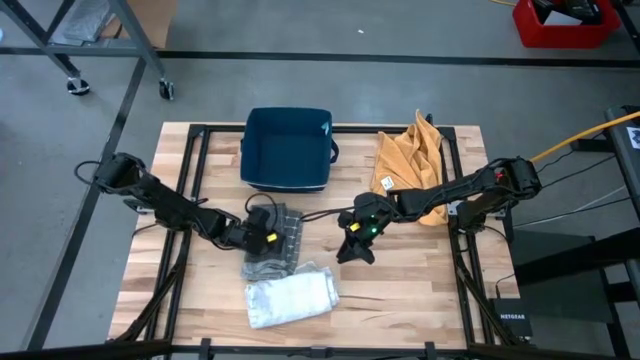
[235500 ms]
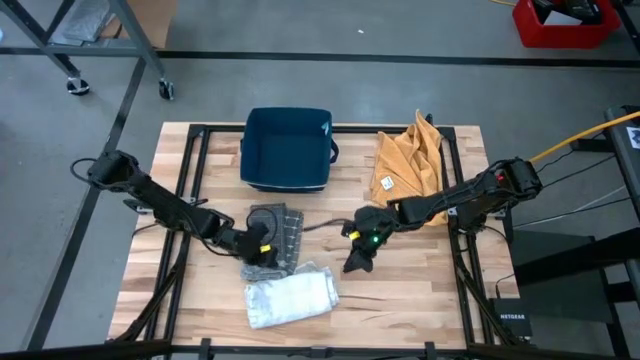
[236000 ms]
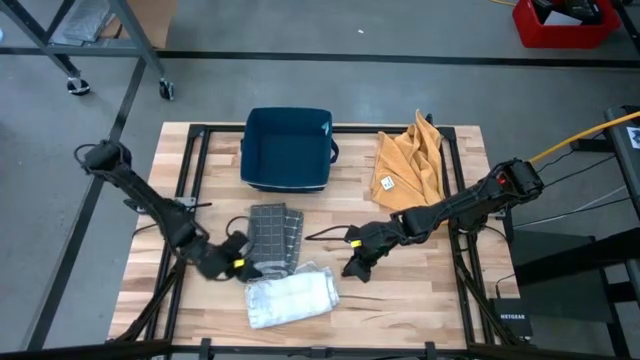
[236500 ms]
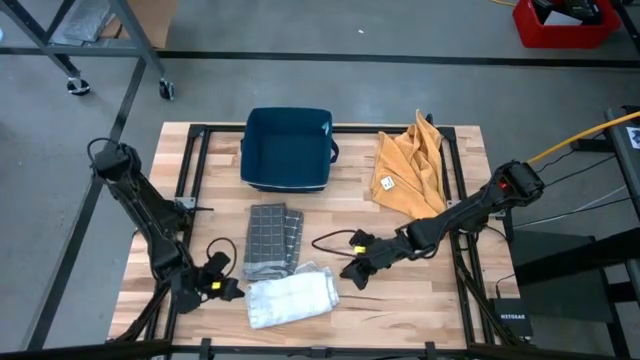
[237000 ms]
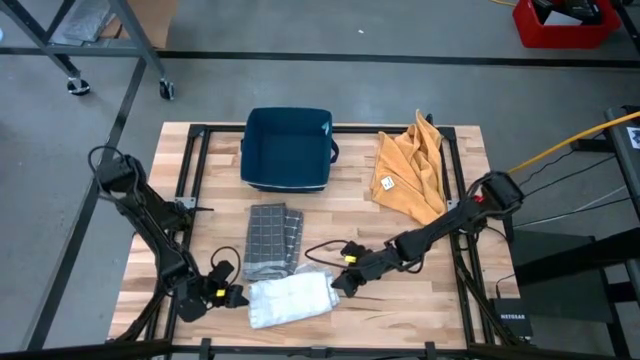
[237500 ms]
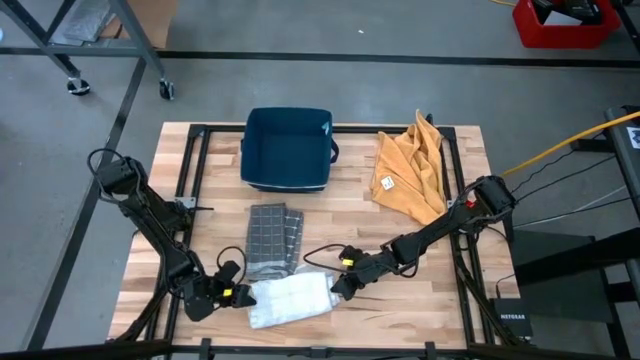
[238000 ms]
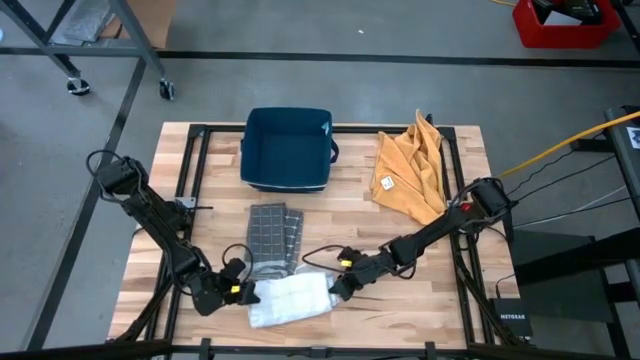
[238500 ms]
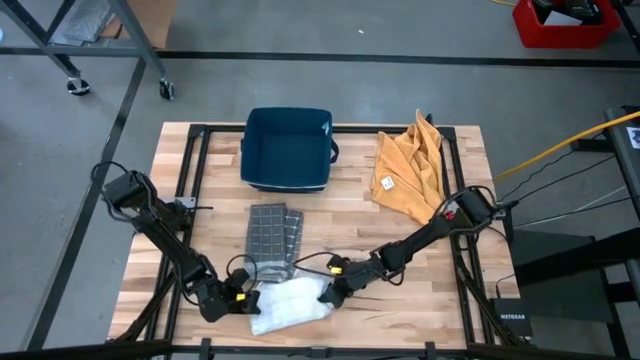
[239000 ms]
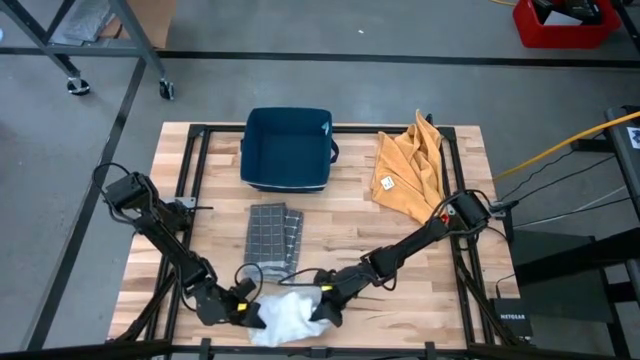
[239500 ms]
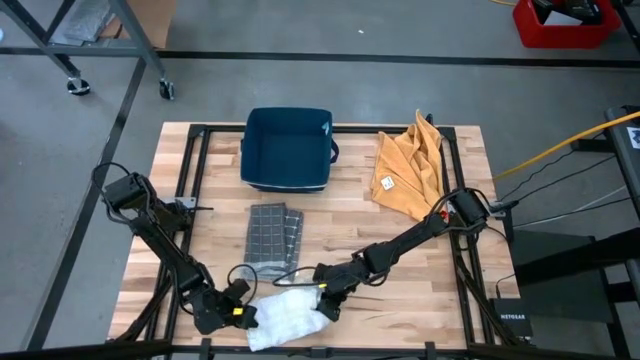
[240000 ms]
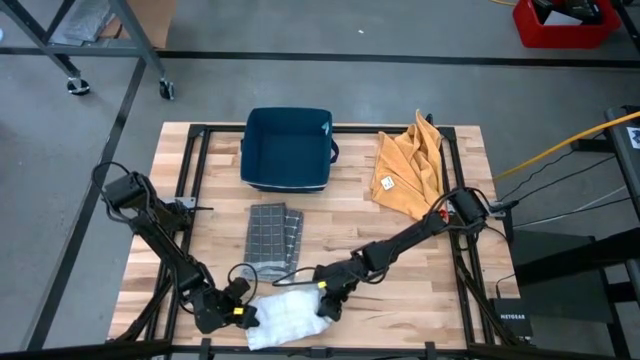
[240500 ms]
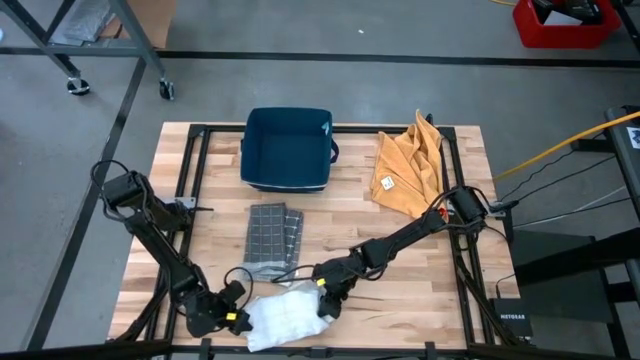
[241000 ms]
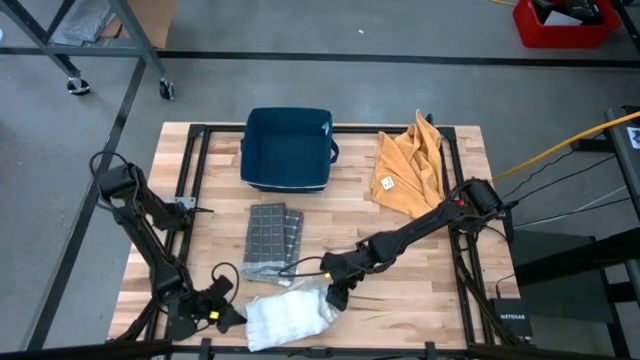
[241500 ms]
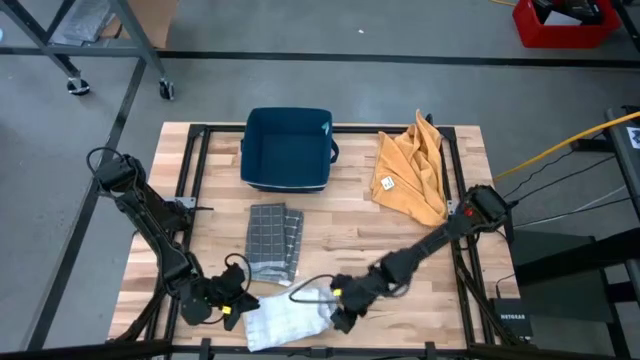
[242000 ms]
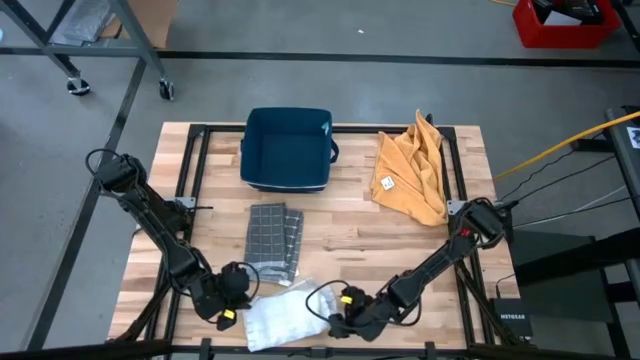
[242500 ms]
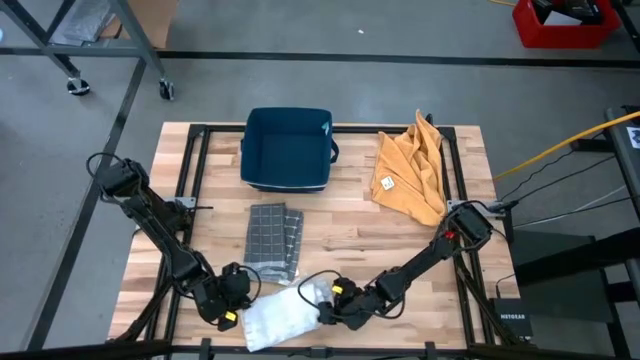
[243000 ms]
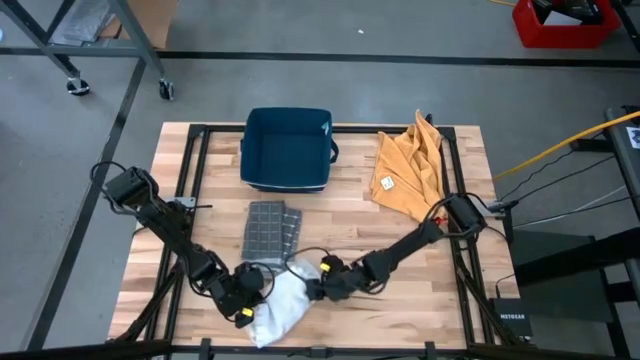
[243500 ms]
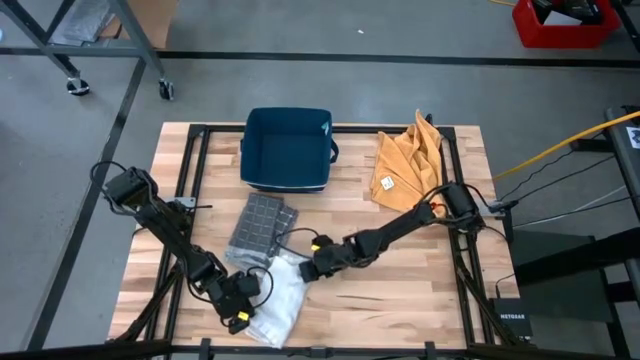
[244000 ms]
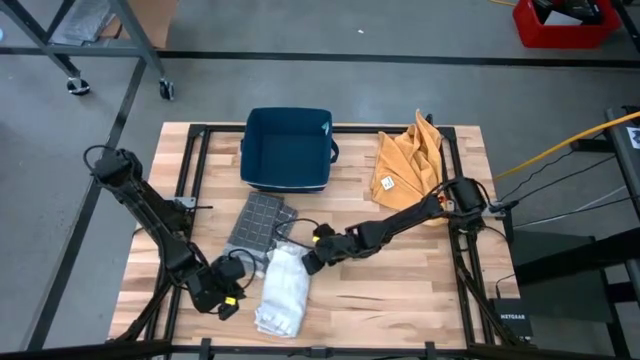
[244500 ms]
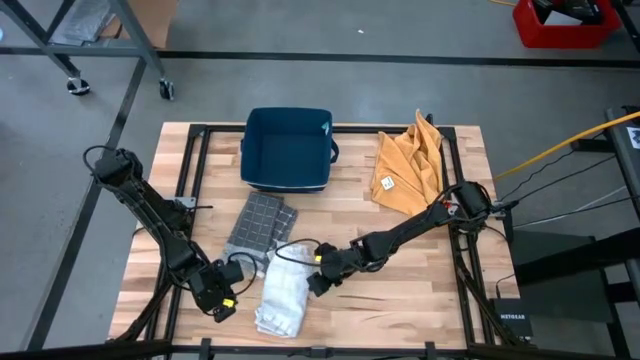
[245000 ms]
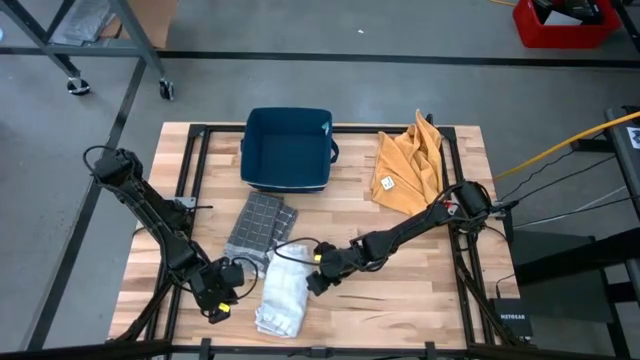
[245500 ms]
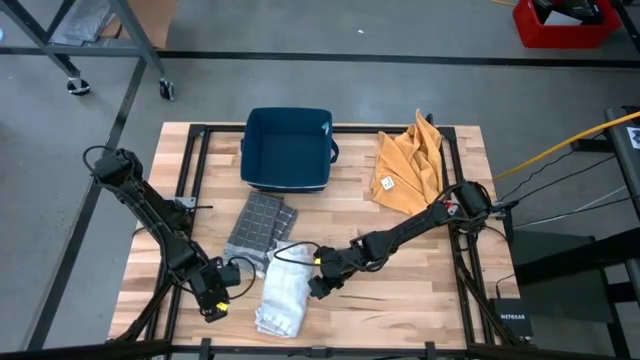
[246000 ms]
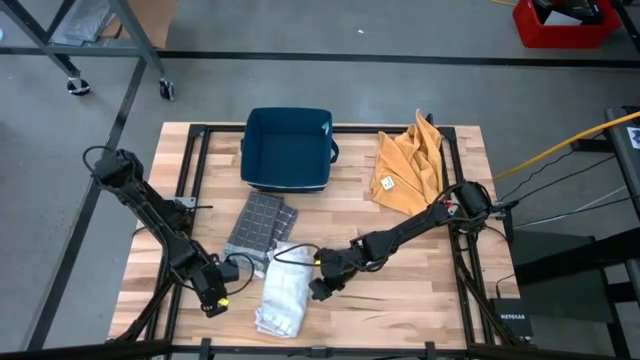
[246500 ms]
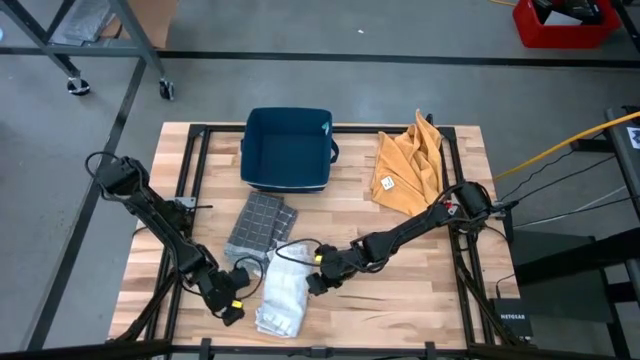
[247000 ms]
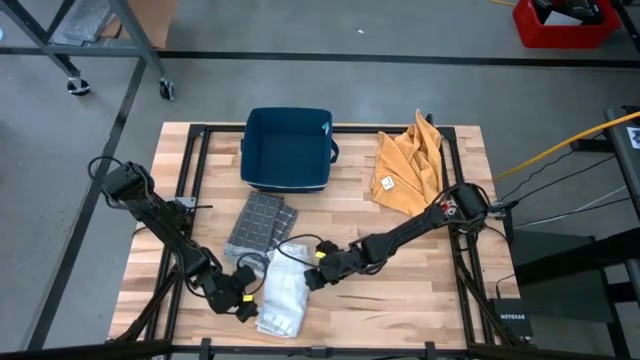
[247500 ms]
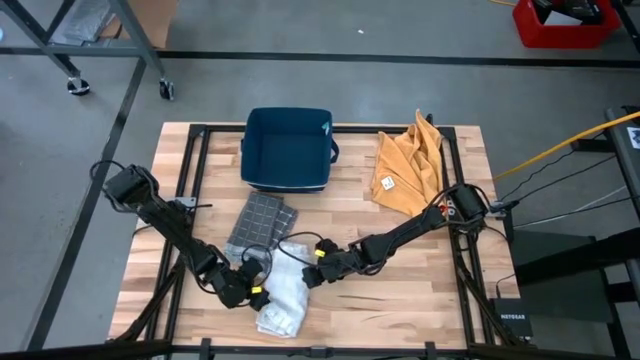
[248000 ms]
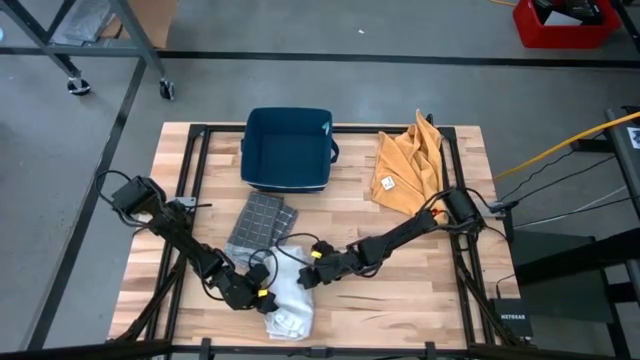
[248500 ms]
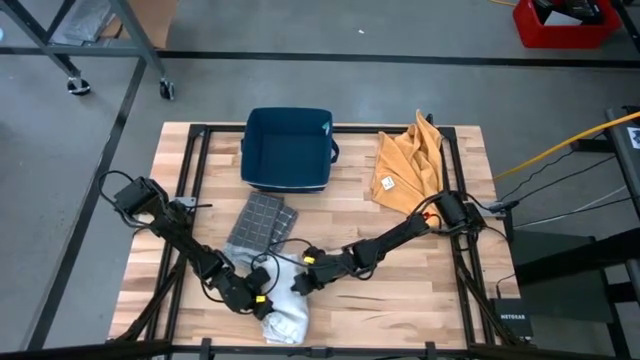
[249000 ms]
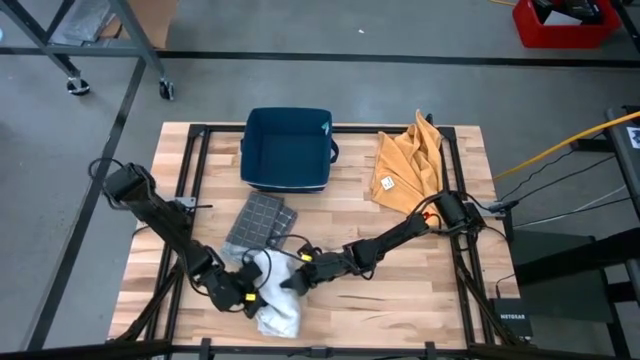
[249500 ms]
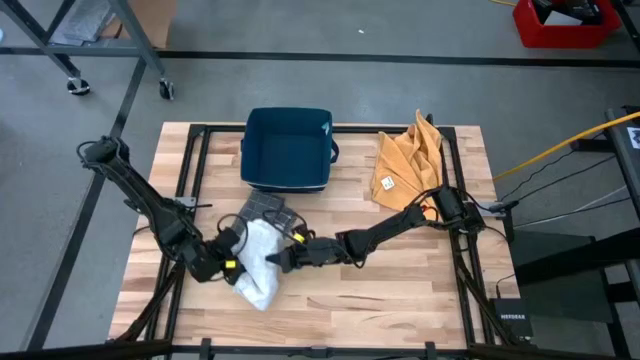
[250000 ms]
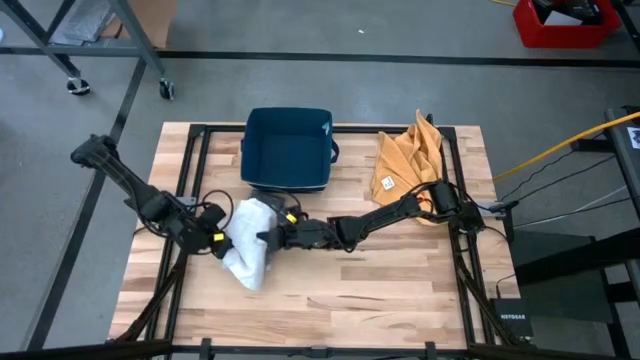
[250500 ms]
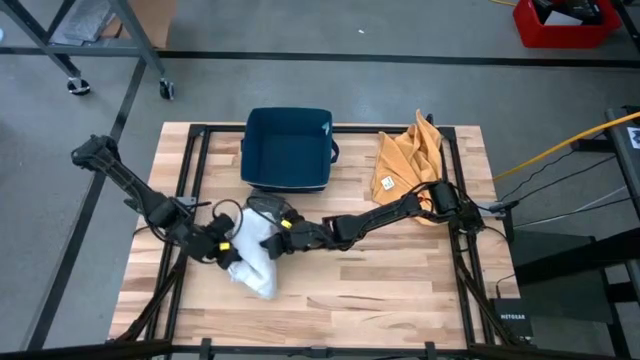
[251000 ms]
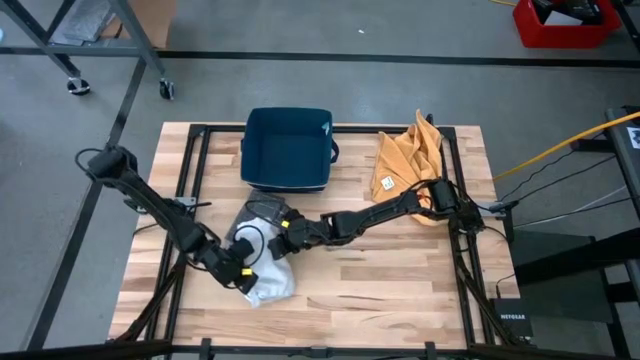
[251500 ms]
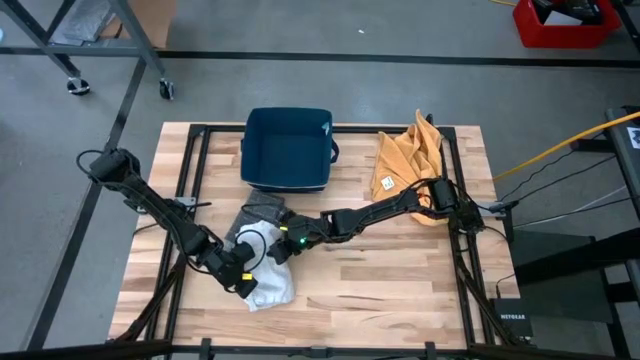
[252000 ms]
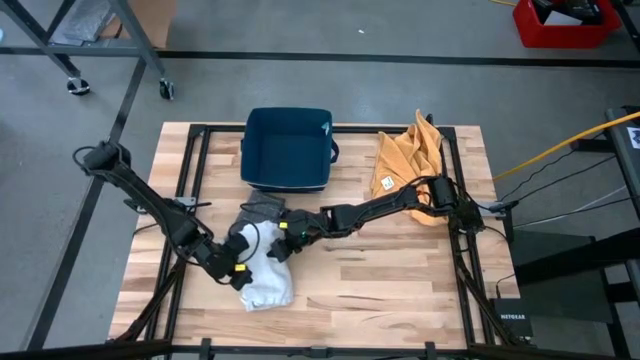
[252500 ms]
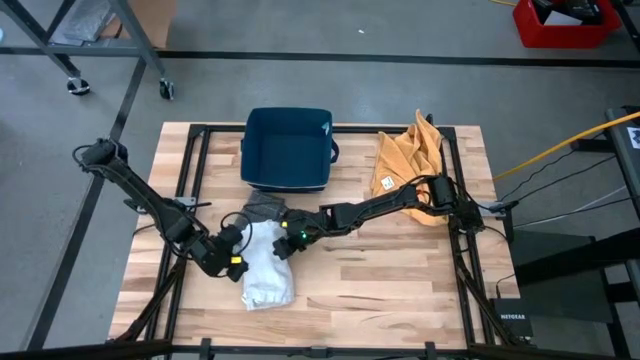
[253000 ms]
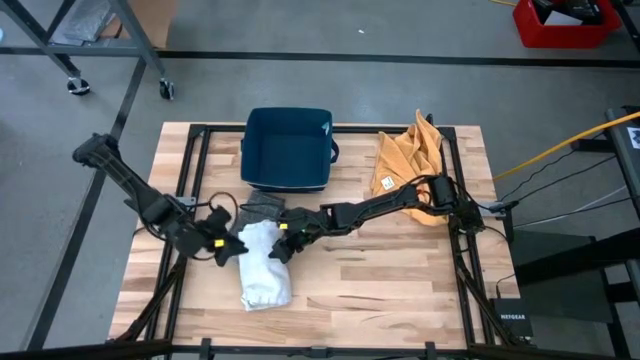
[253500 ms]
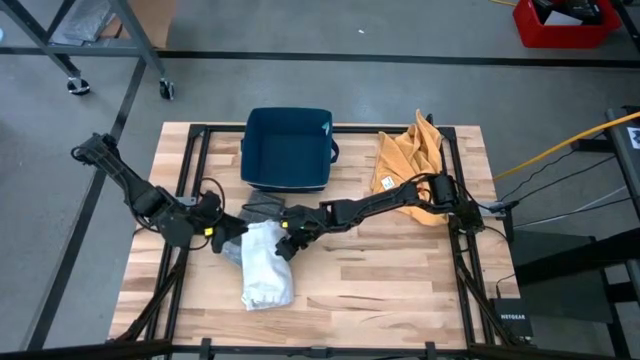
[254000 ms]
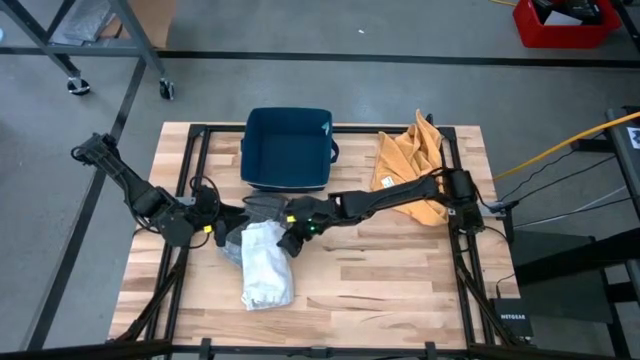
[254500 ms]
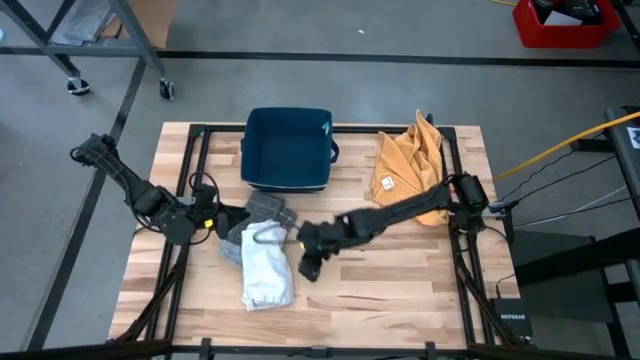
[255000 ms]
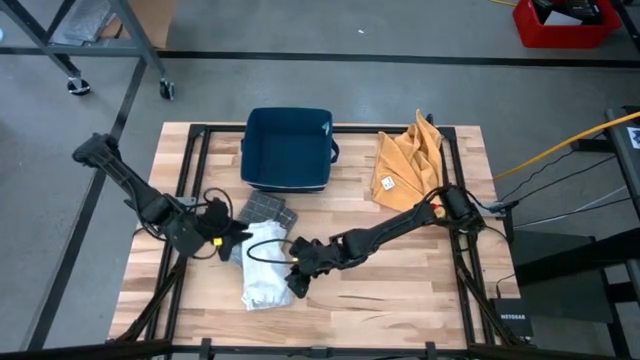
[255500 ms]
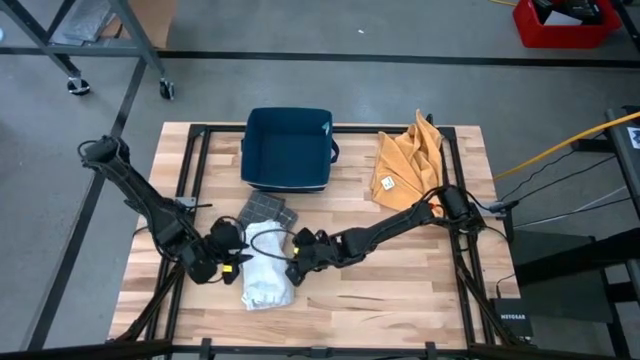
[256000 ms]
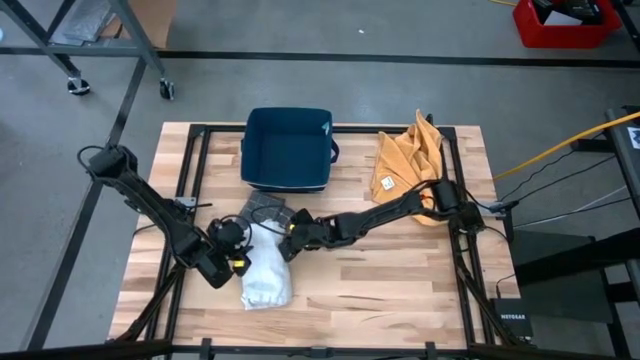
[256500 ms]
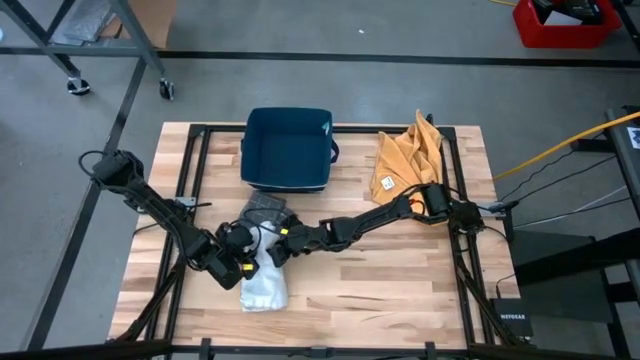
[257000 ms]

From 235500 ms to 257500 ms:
Task: Fold towel
Stack the folded white patterned towel on top of the folded gray patterned towel
